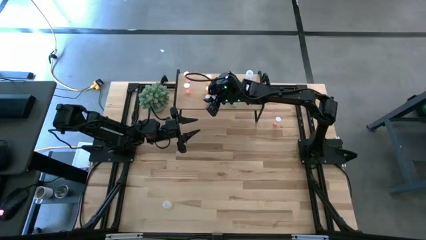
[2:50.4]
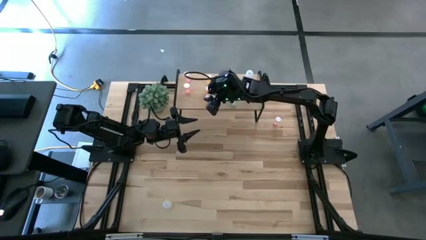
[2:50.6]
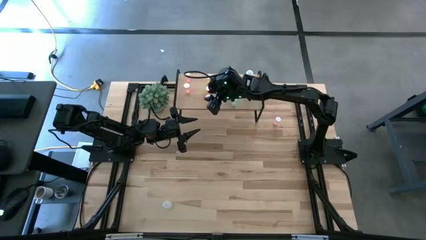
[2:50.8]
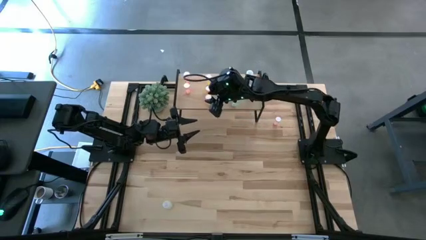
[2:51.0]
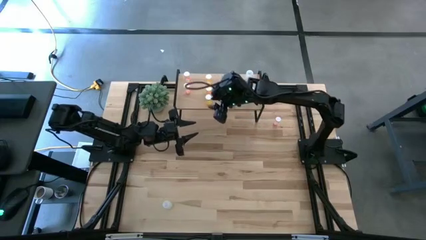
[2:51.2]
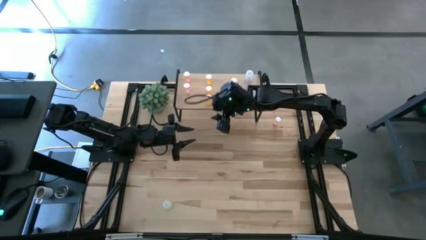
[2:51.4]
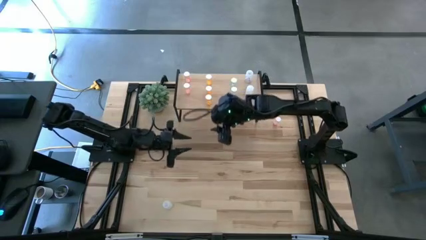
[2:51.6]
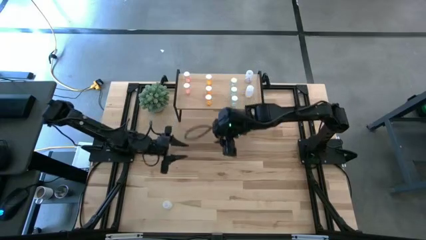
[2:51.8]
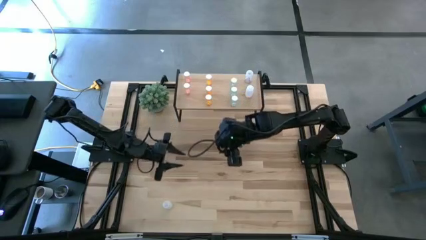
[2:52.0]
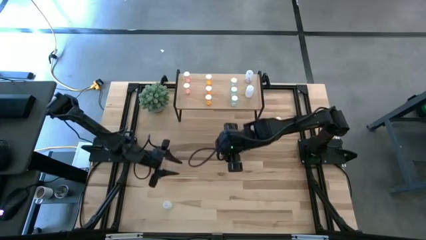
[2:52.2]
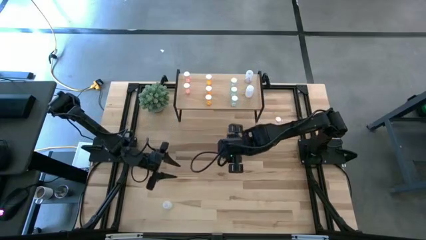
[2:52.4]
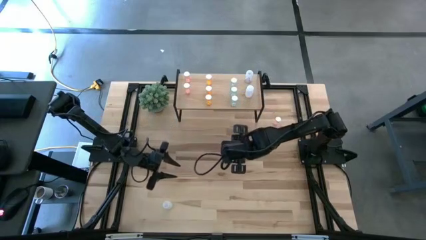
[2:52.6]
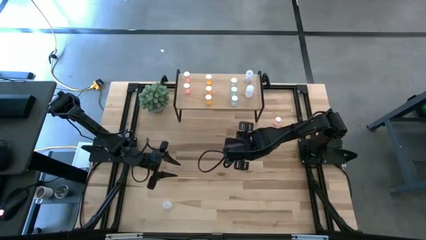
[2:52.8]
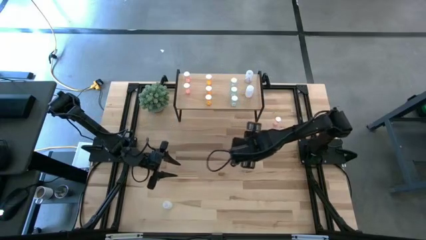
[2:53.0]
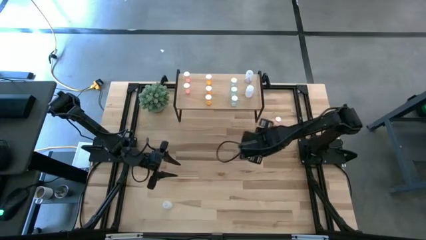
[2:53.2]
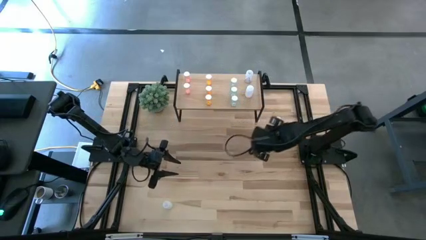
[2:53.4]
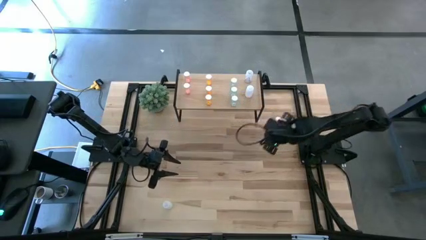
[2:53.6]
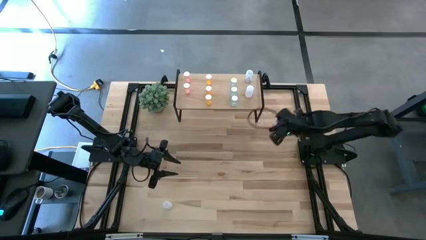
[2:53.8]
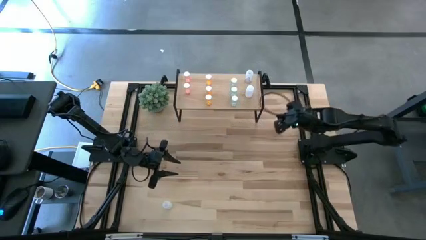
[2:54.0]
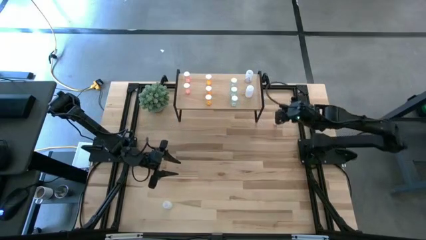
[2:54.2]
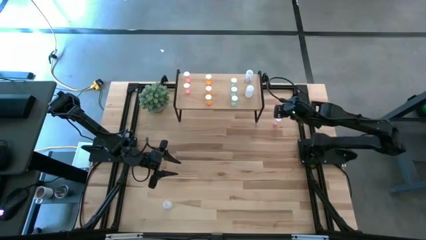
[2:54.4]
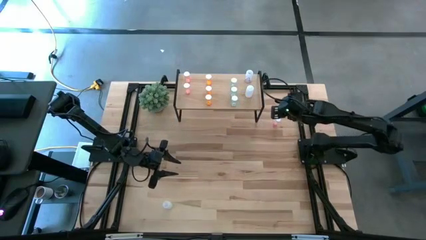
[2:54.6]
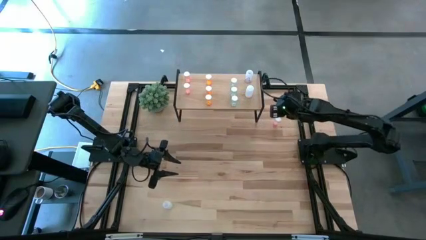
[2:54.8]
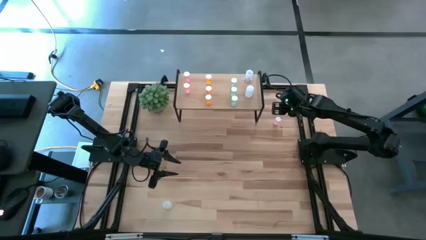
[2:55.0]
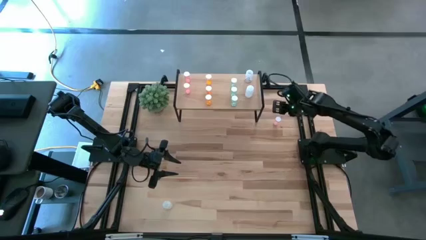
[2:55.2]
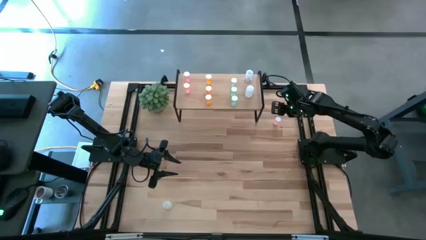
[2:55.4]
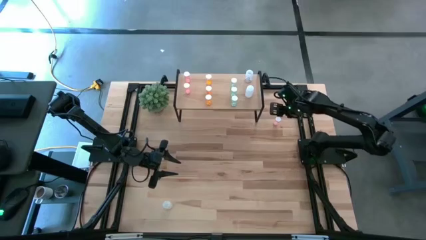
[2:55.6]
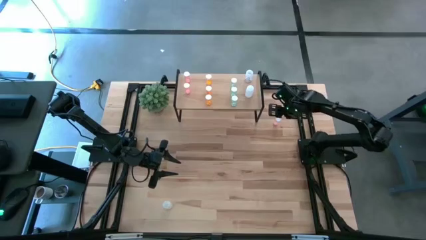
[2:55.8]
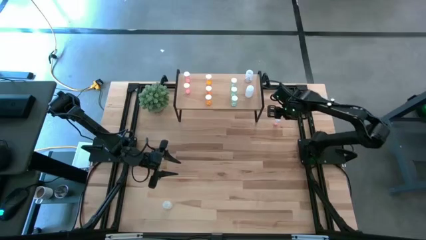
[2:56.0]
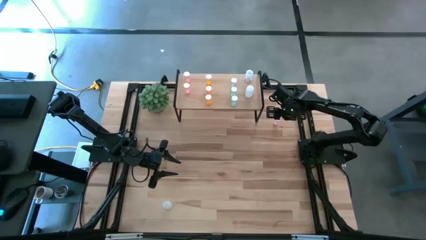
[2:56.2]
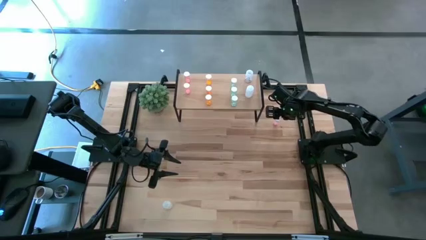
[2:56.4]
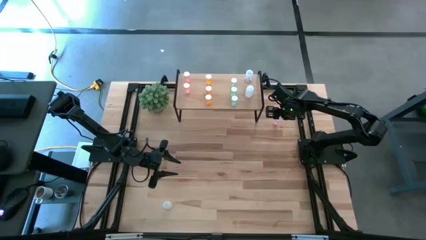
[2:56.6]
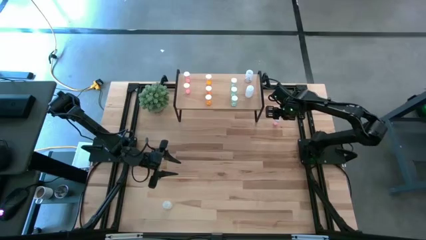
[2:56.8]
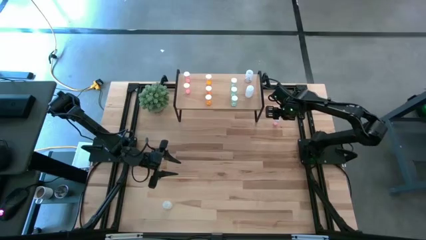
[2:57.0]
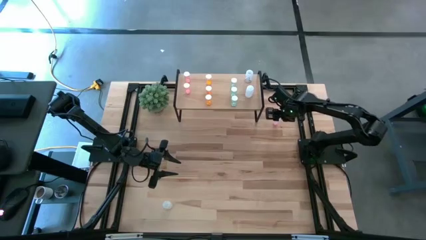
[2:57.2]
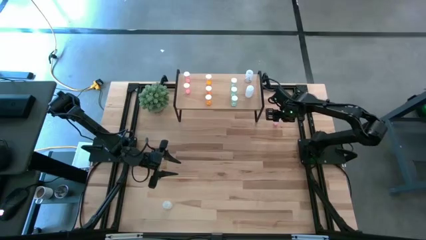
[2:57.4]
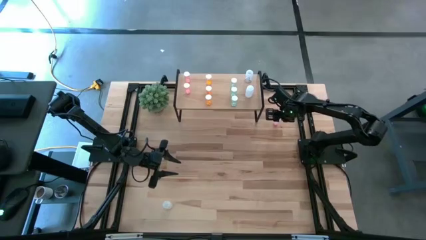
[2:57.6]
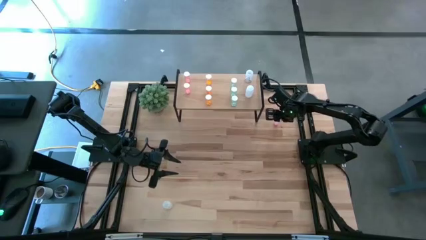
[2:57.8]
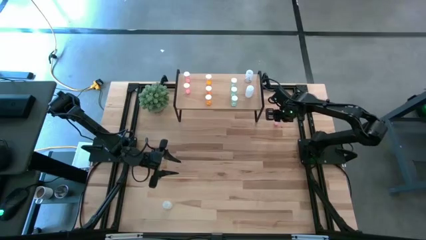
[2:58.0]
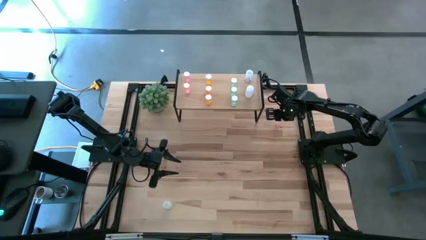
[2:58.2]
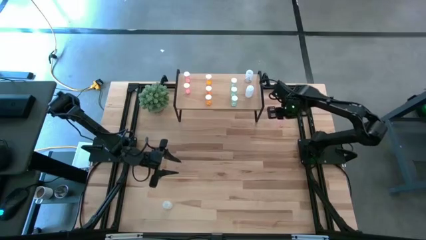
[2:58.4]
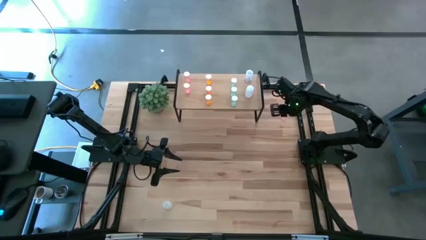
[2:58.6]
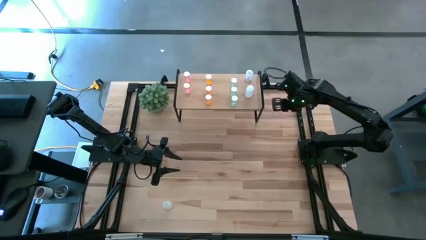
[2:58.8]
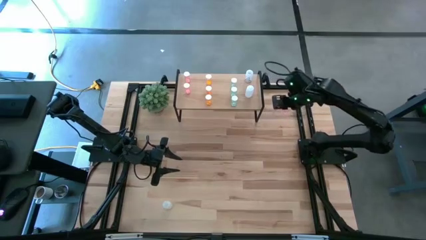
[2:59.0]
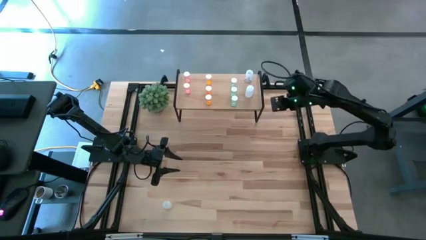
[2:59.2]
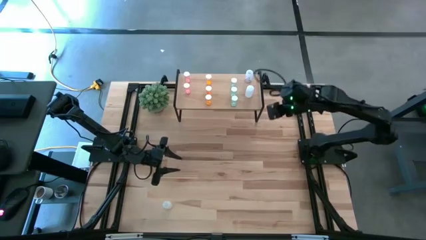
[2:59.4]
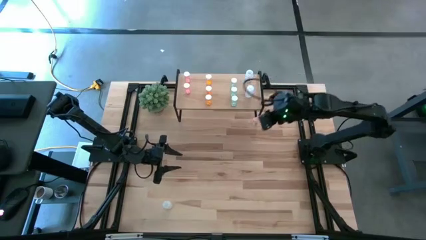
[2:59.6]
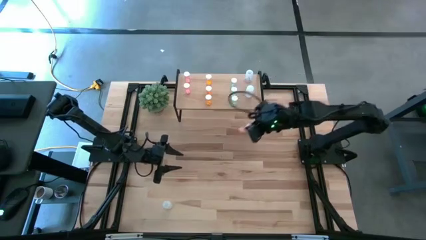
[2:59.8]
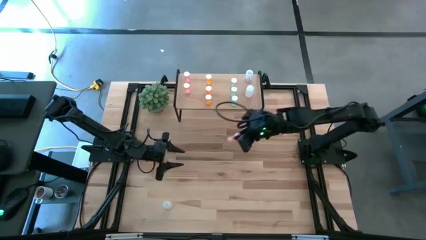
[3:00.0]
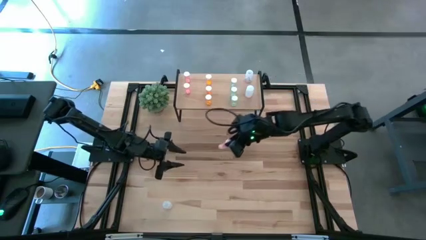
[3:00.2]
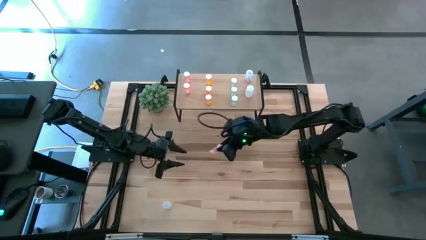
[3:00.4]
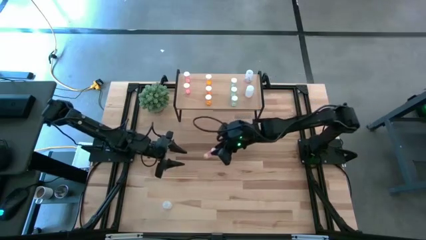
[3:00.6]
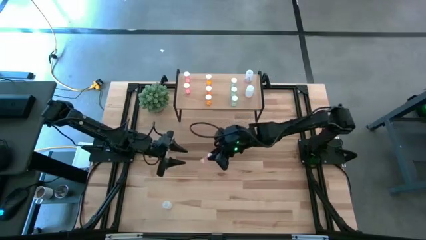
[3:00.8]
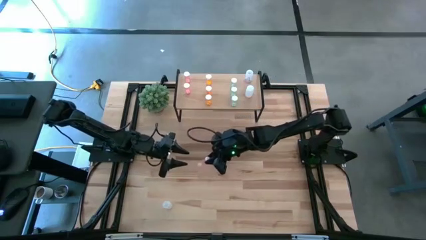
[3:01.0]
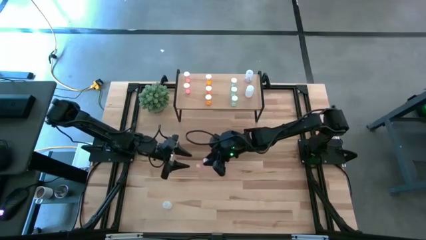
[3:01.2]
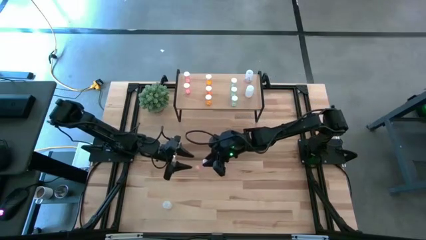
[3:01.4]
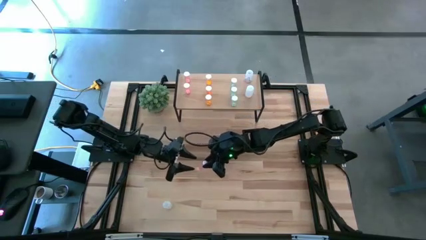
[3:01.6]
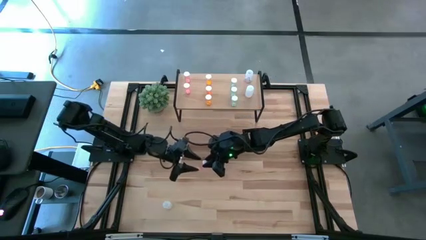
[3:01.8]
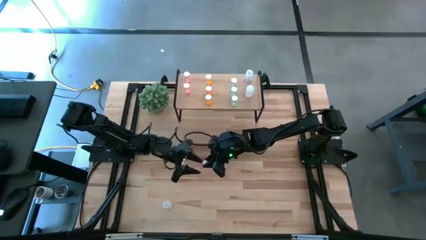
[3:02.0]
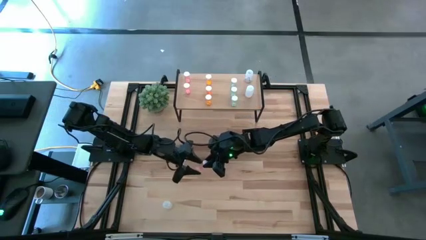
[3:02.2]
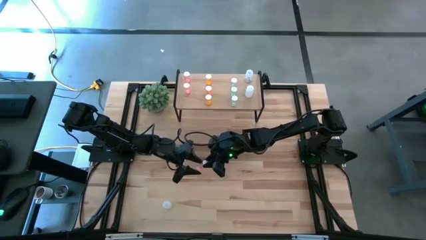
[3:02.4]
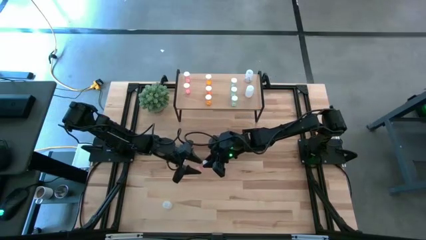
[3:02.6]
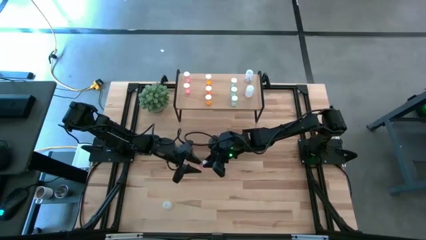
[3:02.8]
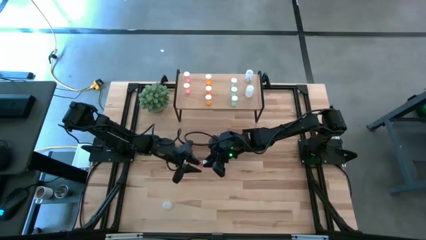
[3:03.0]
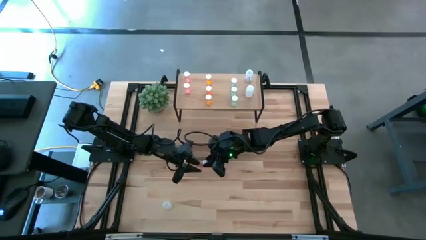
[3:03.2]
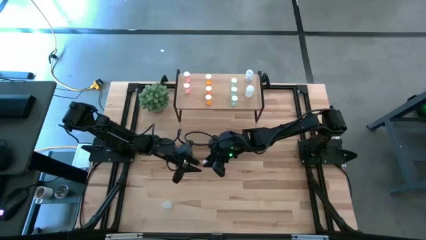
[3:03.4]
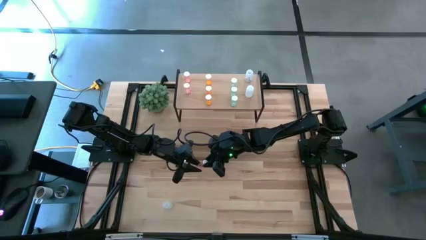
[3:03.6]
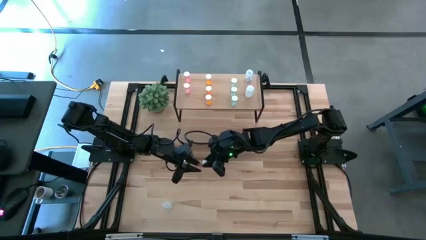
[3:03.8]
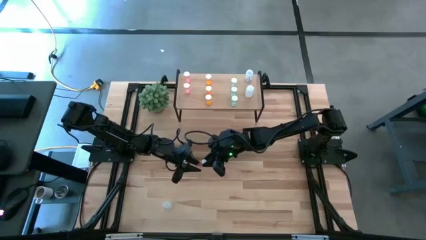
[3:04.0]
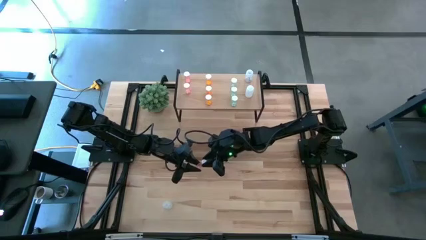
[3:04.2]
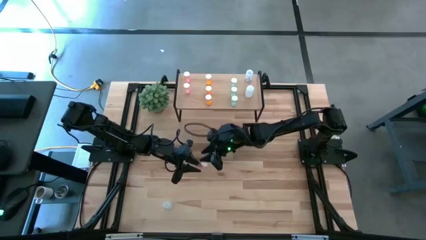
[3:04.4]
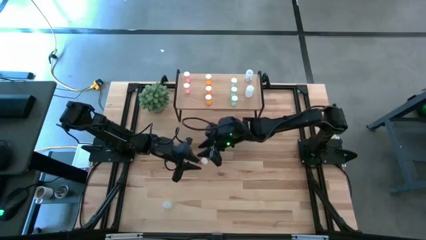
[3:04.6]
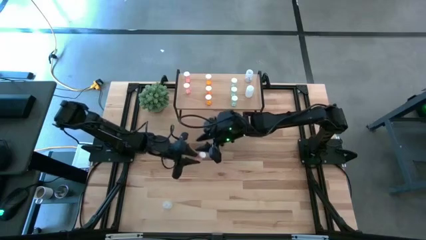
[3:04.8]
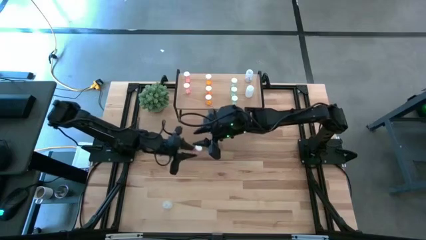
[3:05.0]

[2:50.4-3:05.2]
Task: Pick and place medicine bottles onto shelf by color
Put the pink pill bottle on the shelf aligned with the other pink pill bottles

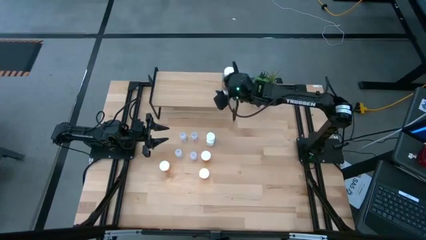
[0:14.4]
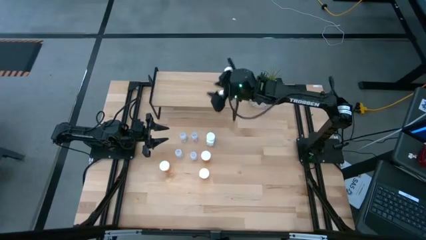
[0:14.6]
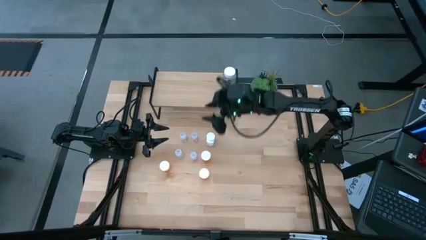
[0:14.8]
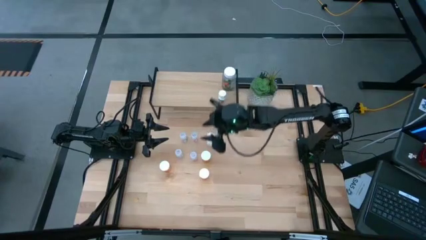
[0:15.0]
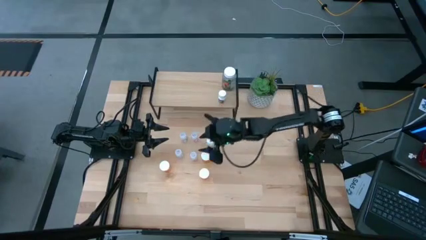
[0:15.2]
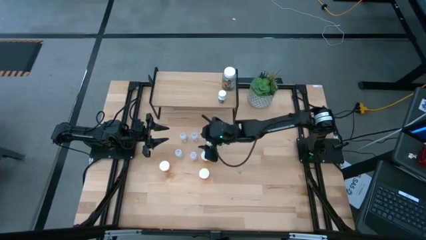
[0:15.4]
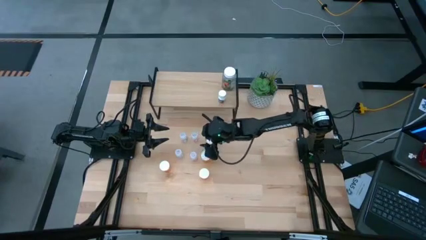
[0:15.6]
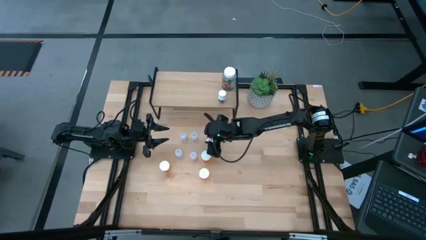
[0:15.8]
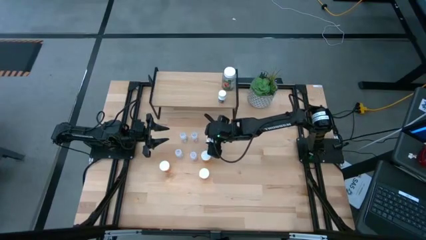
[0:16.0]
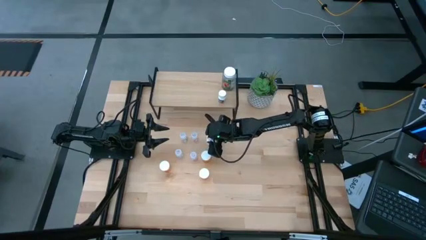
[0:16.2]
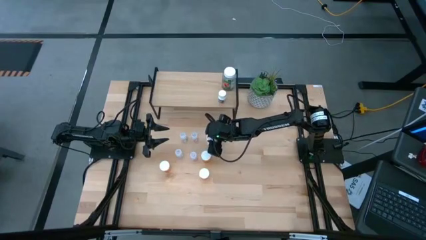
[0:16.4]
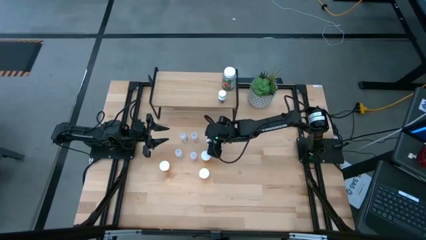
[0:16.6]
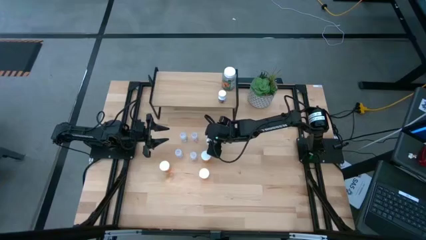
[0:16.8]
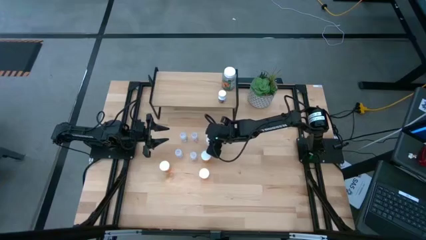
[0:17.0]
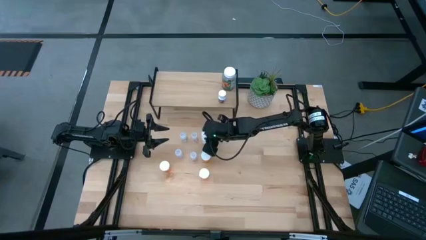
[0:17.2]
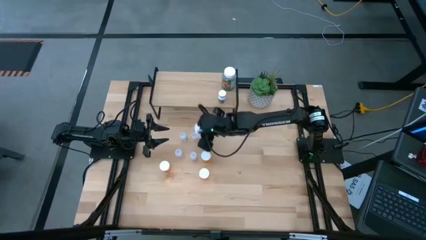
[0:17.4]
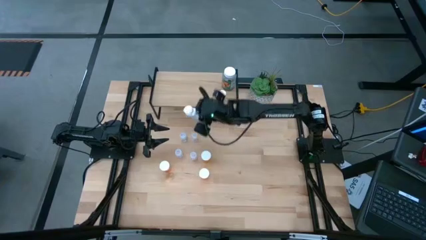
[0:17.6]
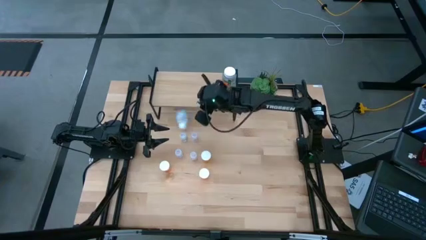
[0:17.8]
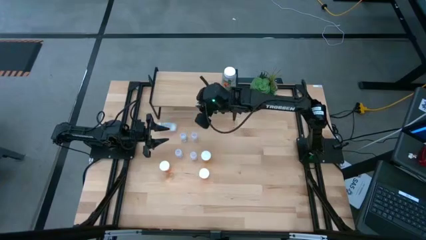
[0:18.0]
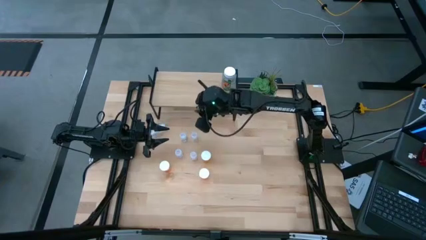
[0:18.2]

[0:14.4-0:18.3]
Task: Pick and place medicine bottles onto shelf by color
Put the white blue pill bottle on the shelf
